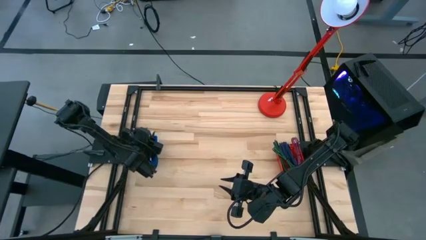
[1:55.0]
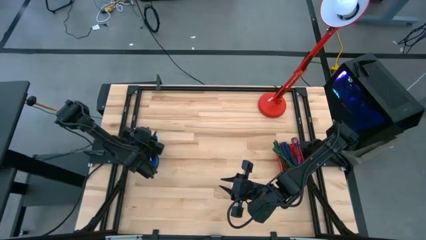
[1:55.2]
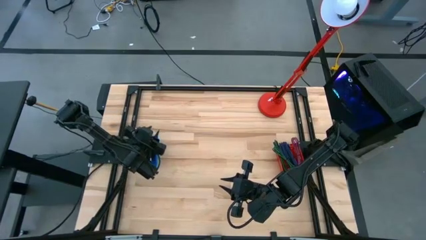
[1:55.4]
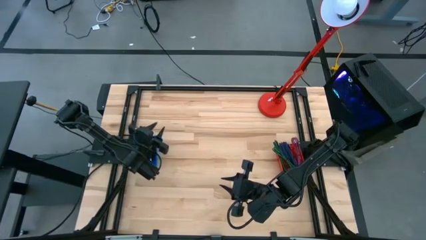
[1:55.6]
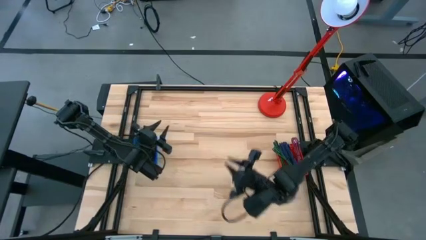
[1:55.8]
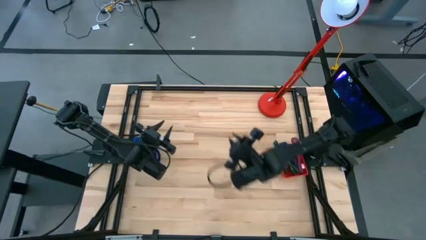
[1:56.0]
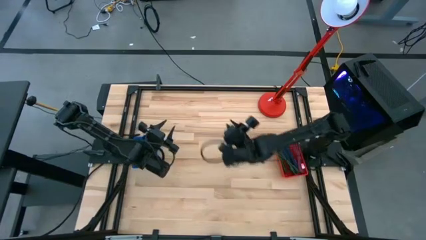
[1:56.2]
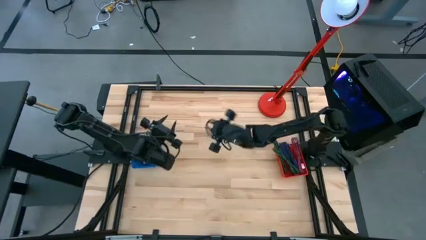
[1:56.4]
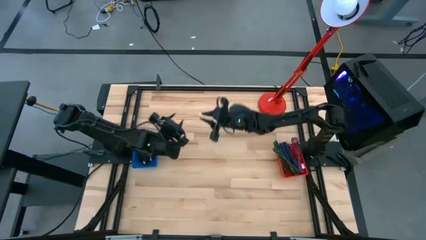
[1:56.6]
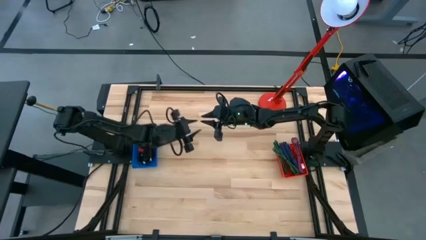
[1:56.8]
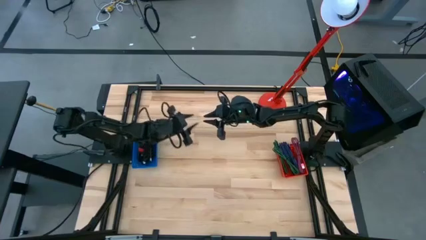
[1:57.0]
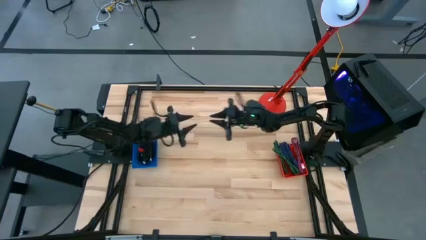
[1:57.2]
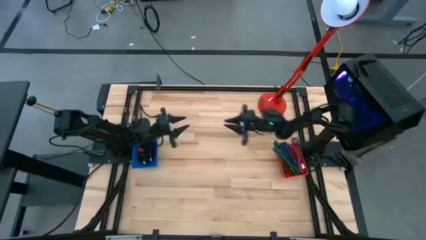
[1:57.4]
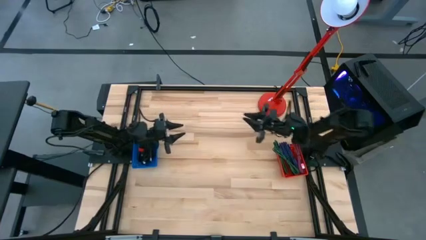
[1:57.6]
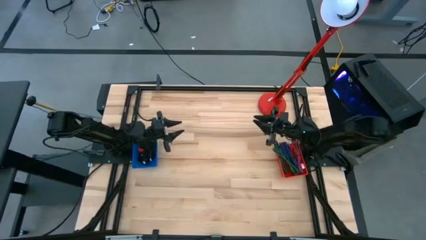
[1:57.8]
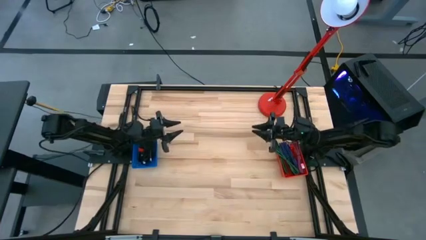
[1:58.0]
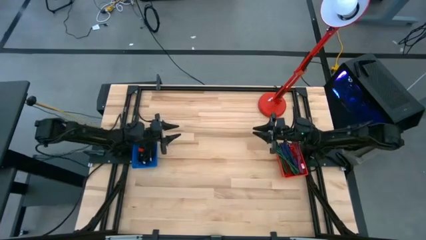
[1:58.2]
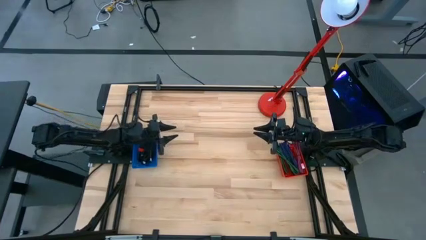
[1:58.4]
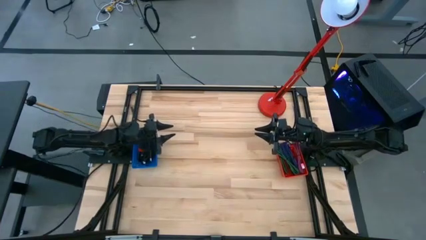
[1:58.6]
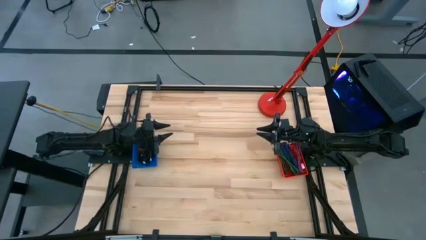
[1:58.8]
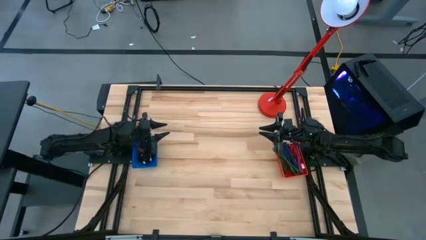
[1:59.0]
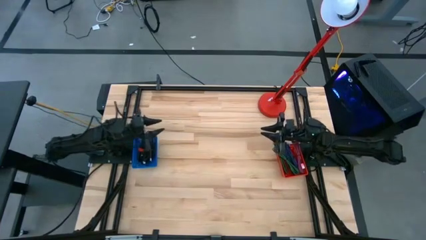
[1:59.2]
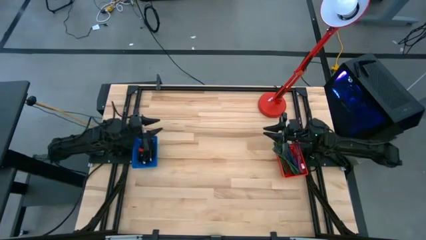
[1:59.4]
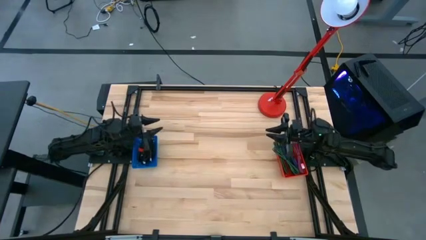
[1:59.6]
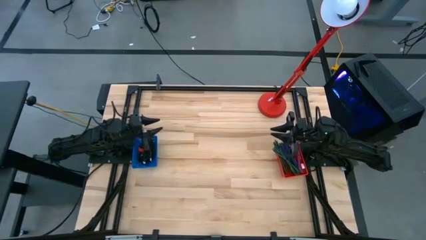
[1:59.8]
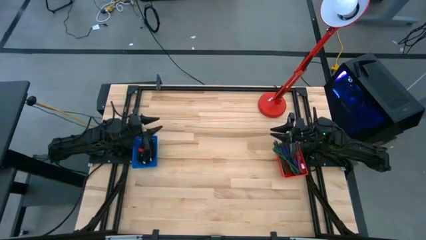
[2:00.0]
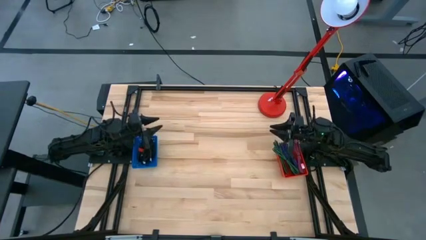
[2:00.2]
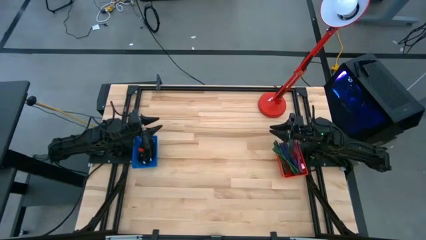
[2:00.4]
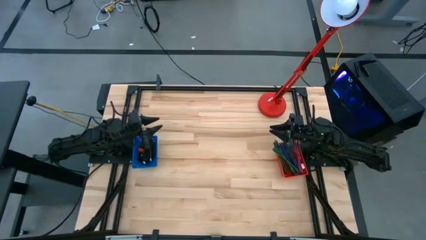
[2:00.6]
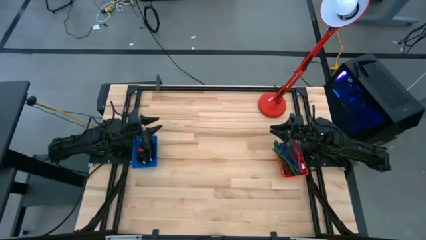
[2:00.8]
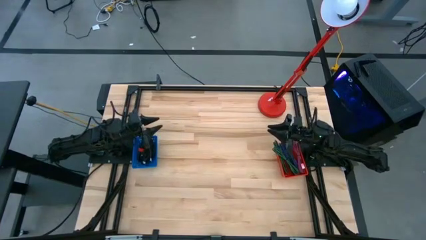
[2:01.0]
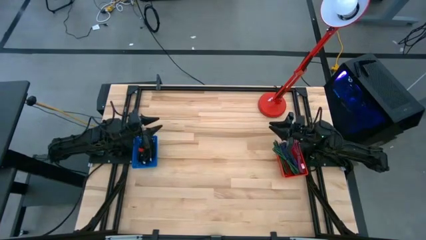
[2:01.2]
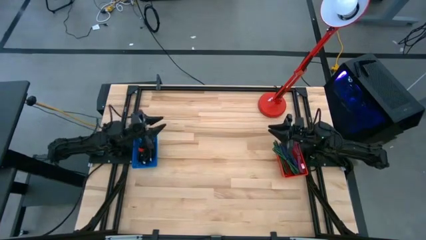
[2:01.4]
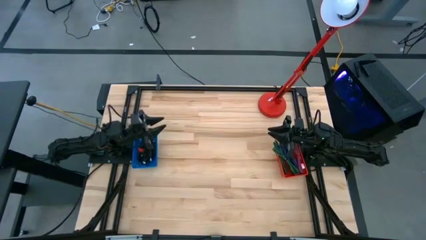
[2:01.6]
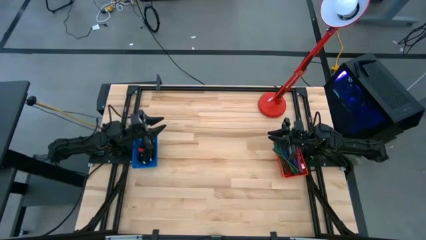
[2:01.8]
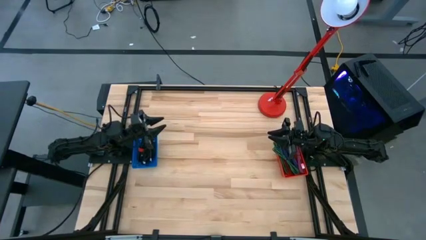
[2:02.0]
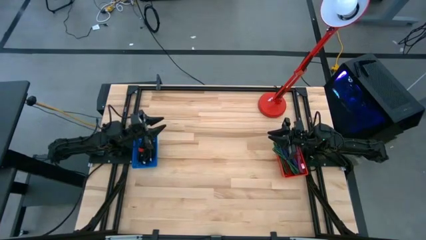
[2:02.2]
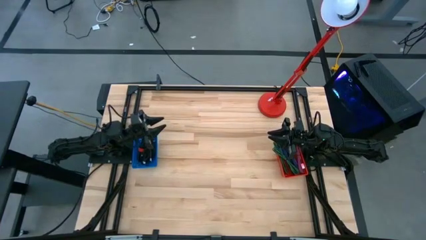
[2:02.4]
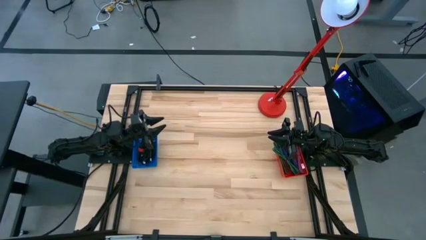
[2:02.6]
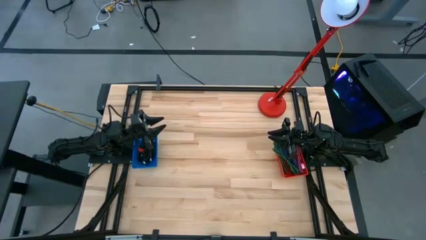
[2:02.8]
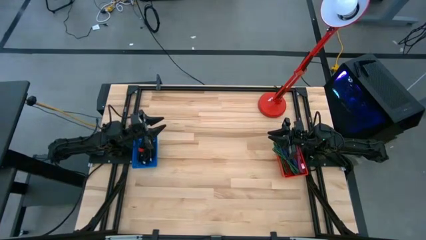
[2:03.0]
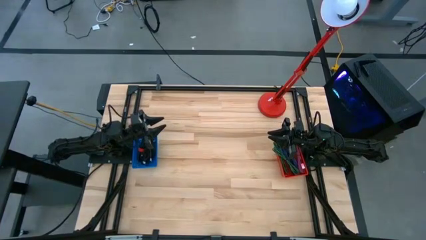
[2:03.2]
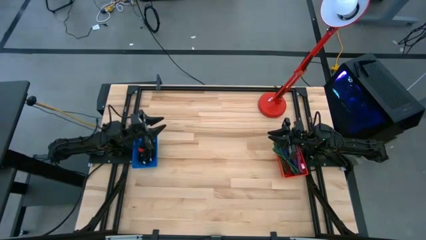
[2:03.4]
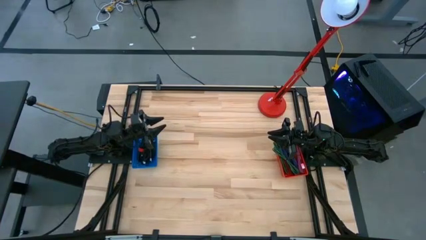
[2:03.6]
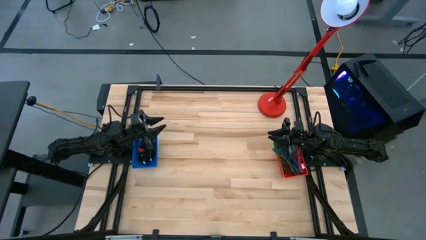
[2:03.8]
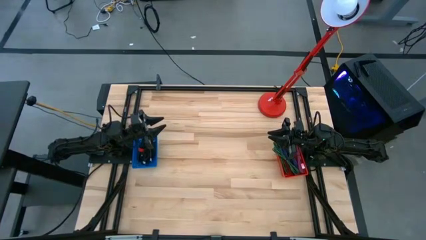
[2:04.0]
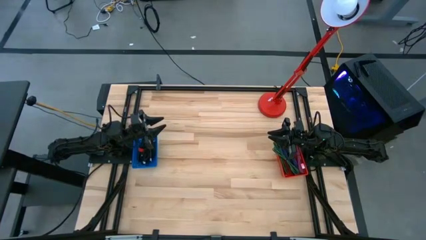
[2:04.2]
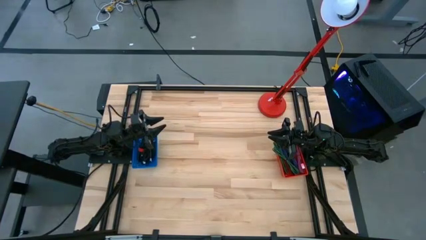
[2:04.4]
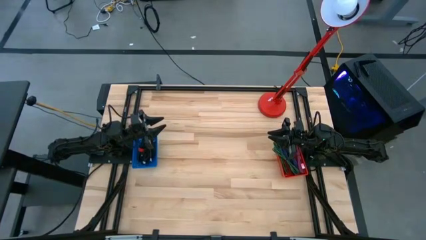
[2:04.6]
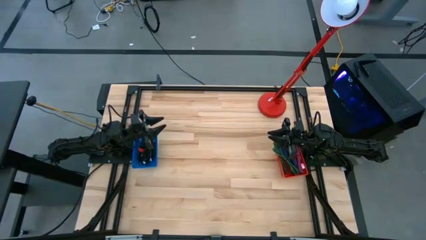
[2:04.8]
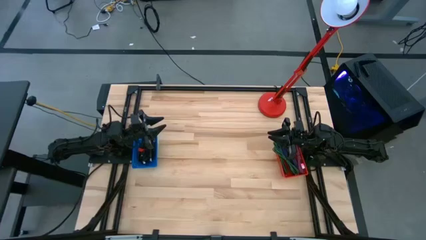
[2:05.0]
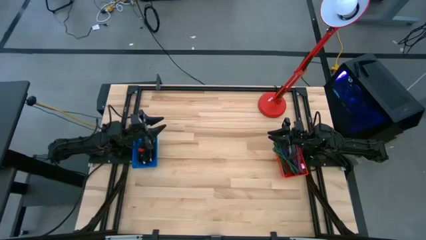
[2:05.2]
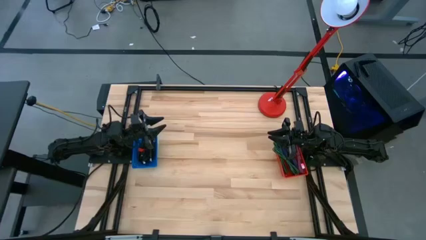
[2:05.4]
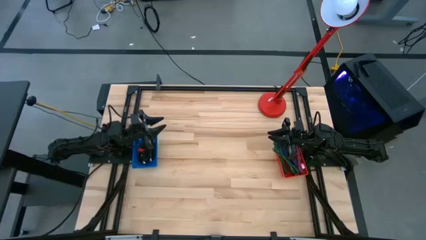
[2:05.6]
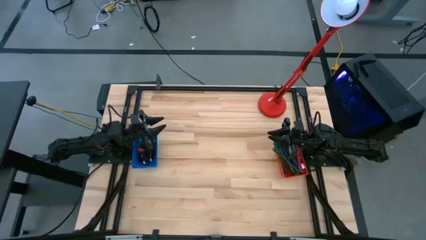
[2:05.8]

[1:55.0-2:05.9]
Task: Pick & Place USB Port
Return to Home Position

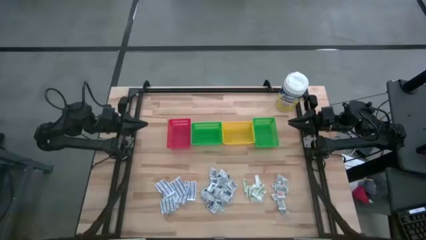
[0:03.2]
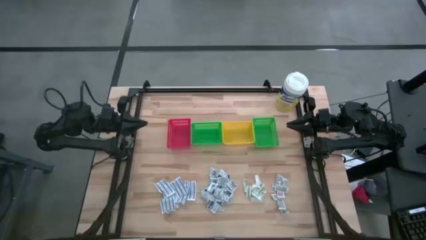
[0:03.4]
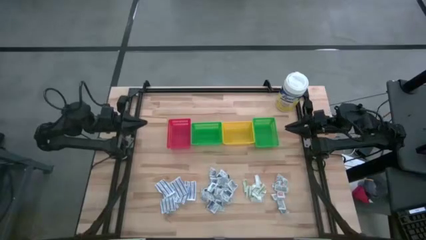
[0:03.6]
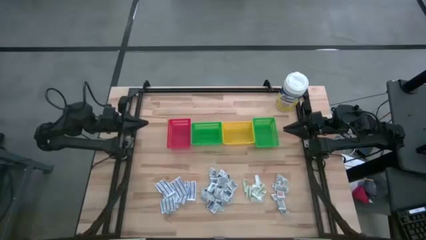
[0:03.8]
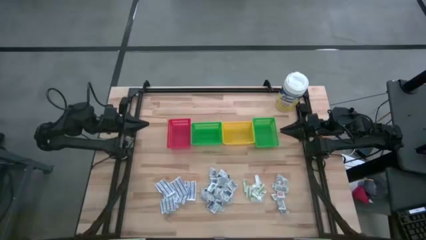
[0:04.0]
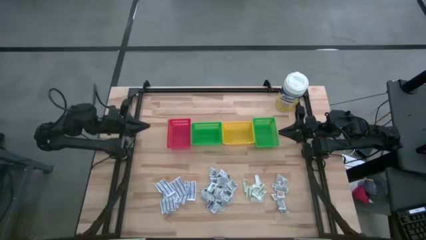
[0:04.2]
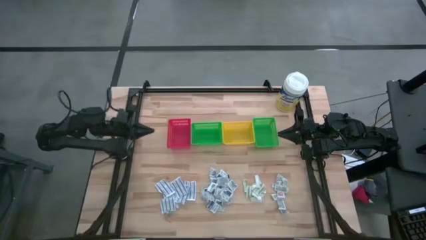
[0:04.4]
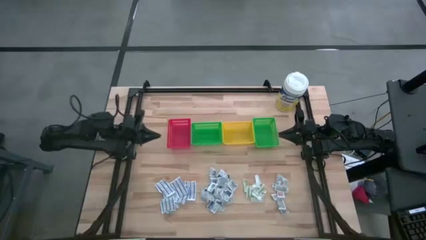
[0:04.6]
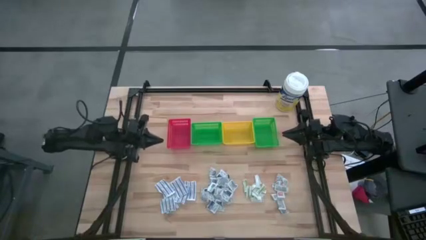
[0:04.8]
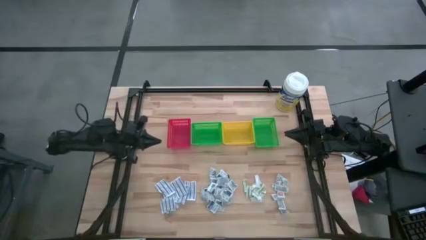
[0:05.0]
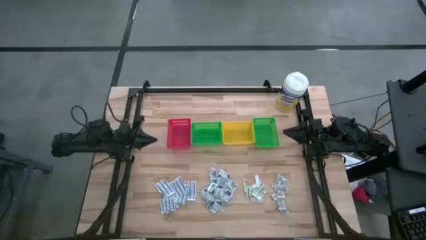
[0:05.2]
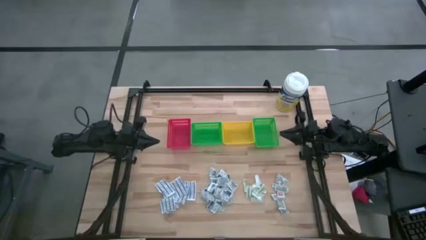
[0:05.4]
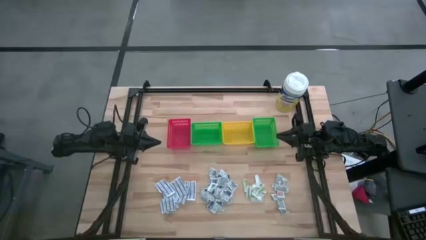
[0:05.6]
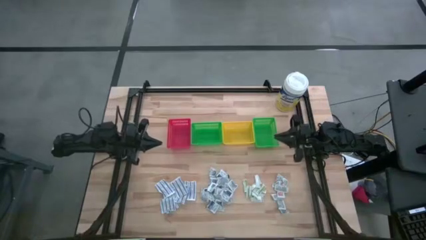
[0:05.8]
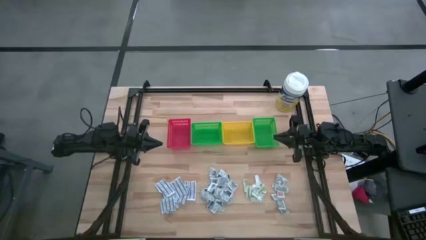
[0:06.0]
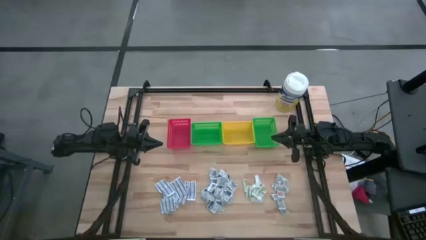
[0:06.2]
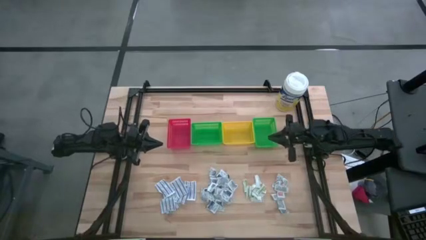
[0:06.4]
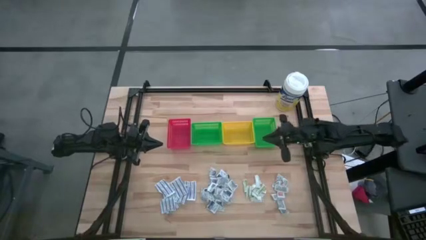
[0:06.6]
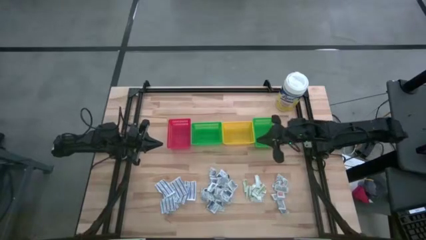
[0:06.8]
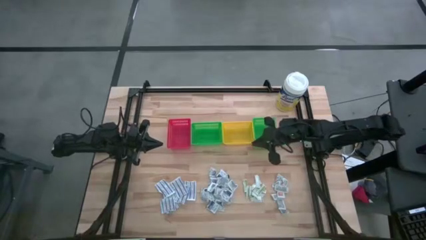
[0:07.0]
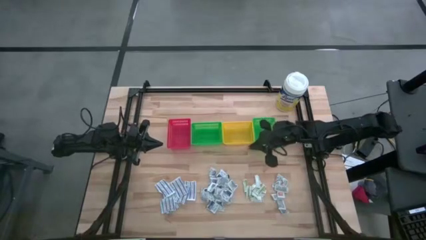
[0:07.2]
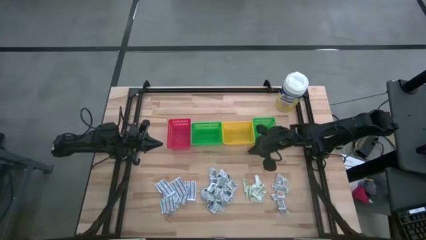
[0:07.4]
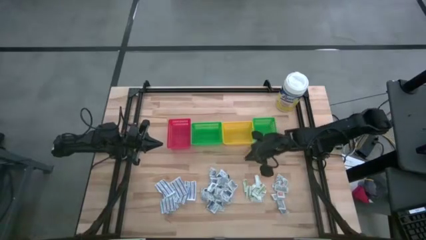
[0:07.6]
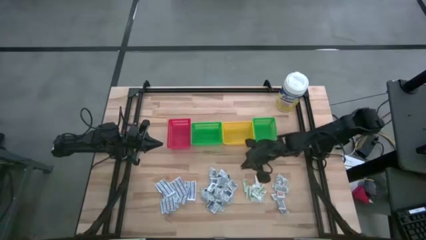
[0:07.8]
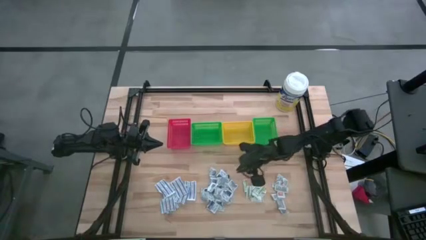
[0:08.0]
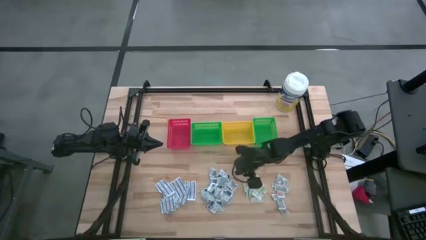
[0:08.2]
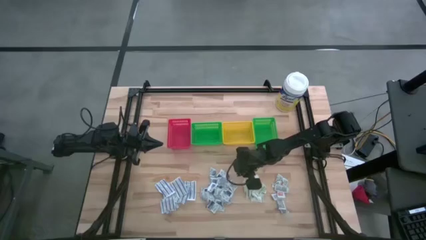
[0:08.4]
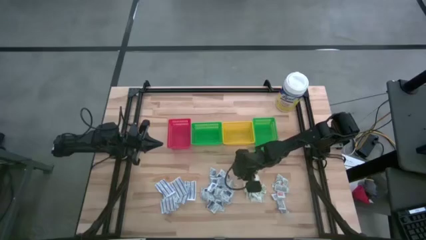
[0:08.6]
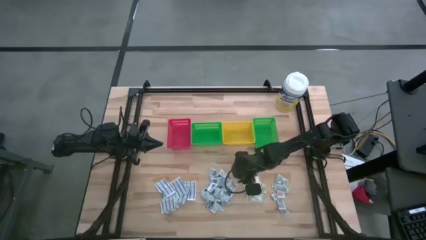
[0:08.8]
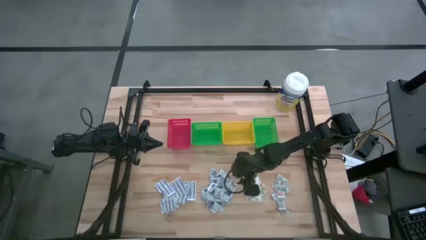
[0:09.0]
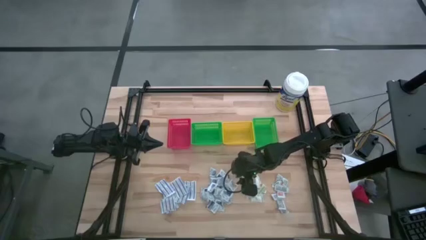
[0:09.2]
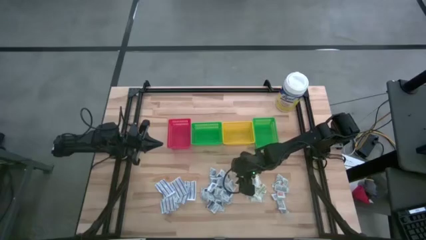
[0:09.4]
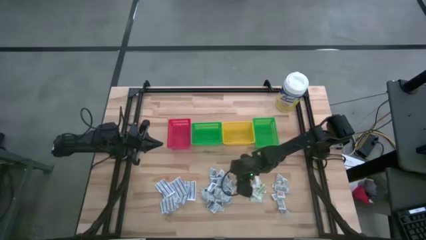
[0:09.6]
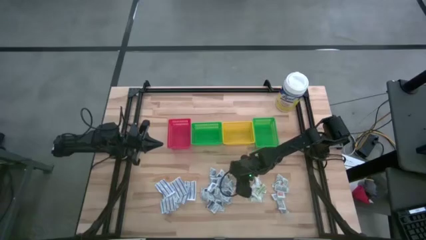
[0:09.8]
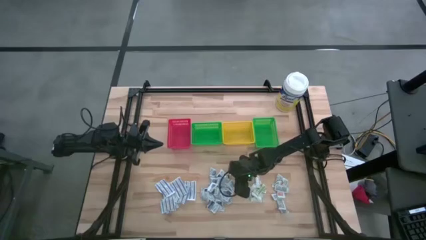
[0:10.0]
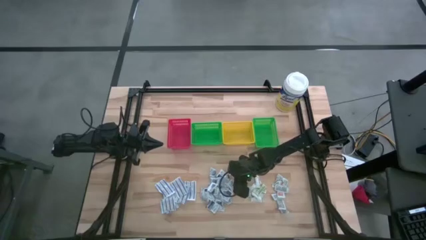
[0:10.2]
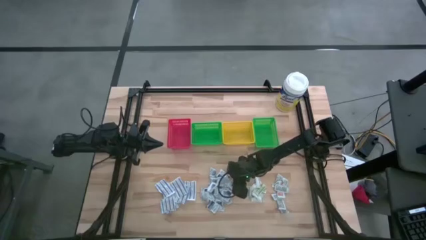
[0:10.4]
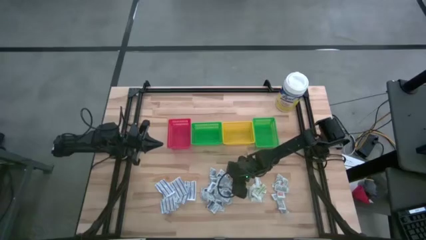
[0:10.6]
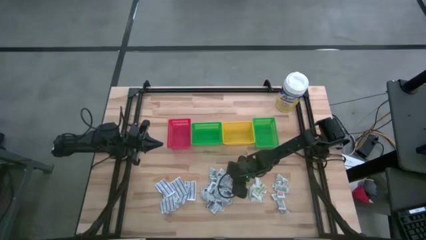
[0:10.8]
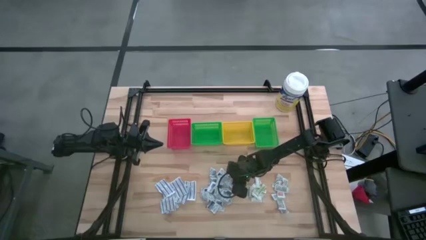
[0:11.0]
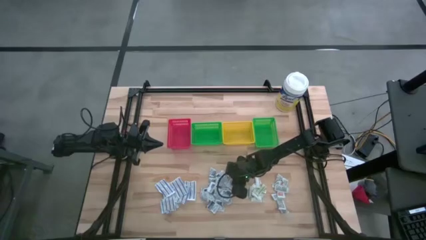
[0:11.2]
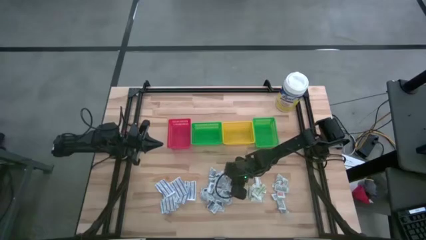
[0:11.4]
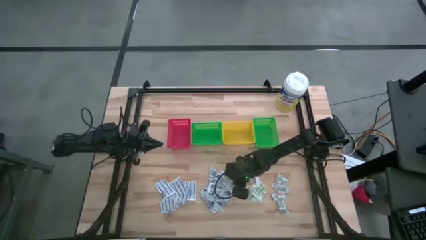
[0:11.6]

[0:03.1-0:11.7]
Task: Pick & Place First Aid Supplies
Put the blue alcohol pad into the right green bin
